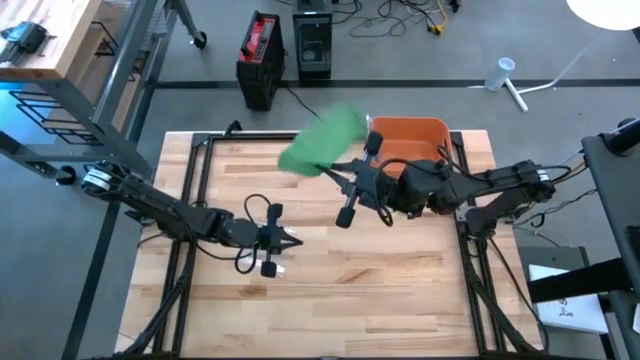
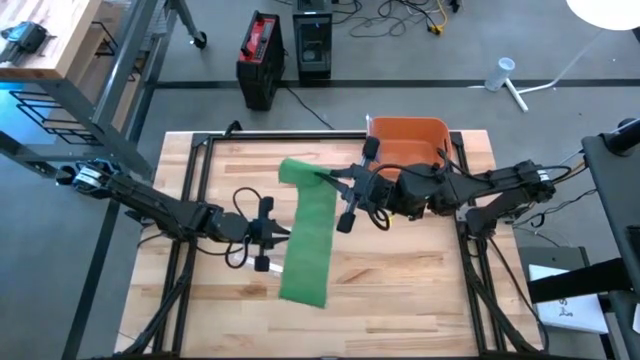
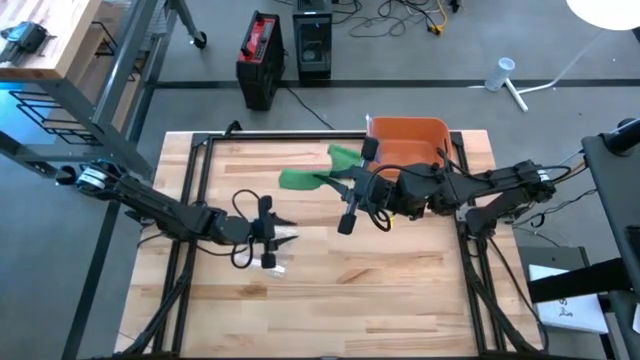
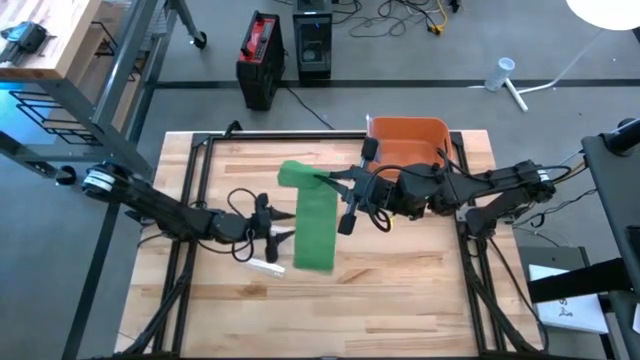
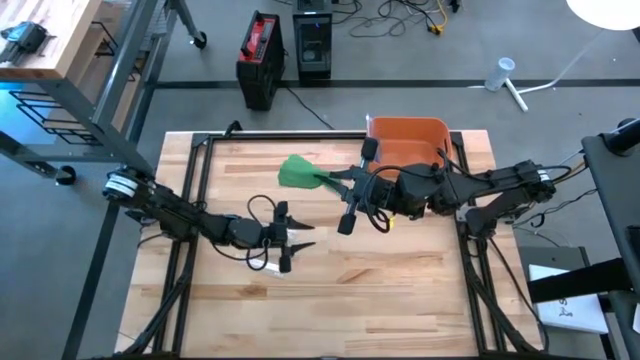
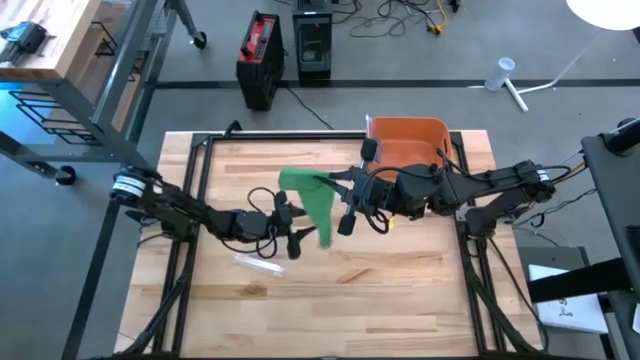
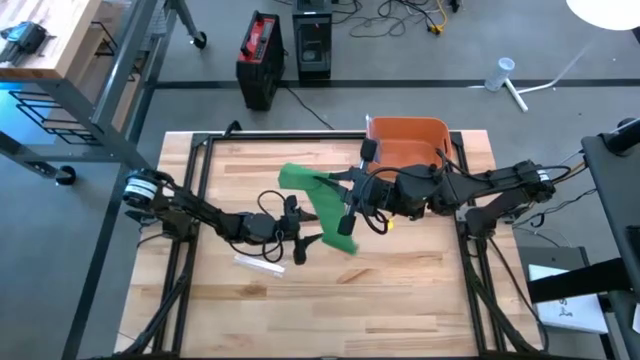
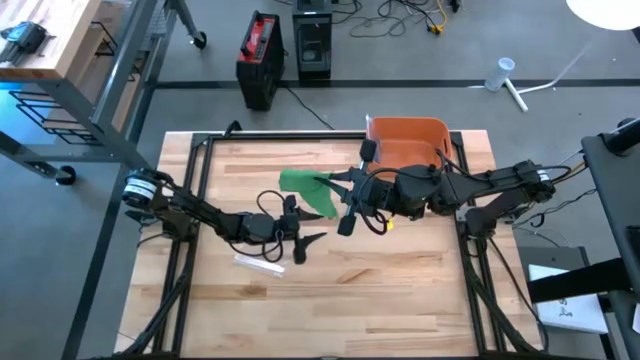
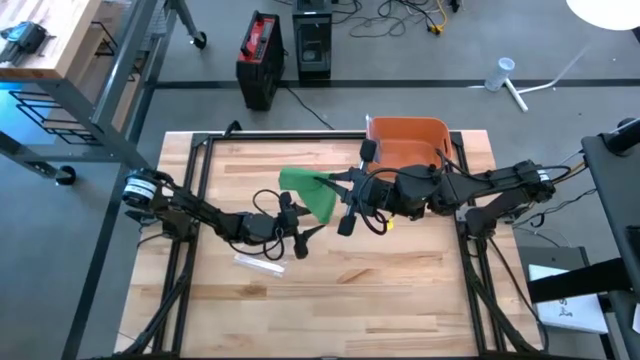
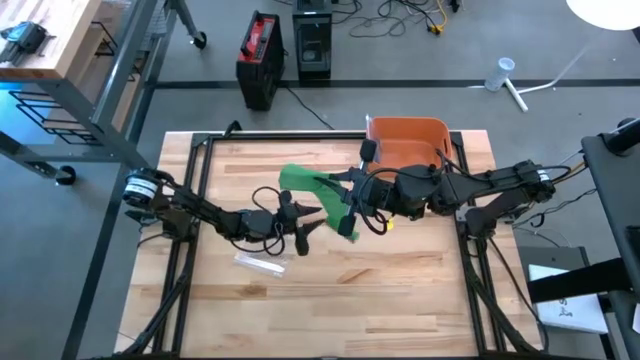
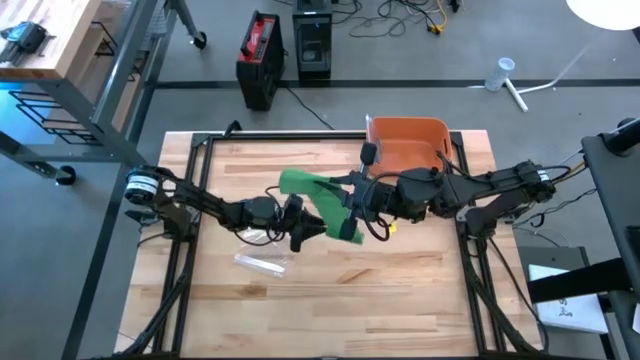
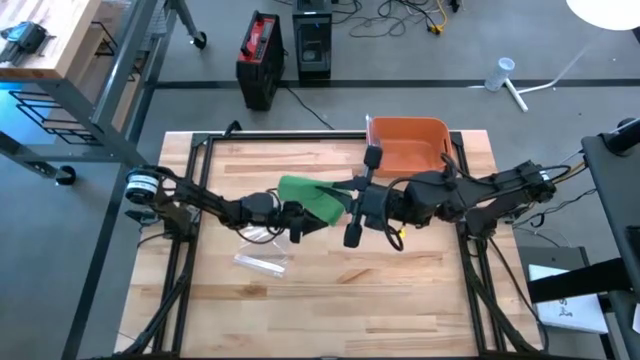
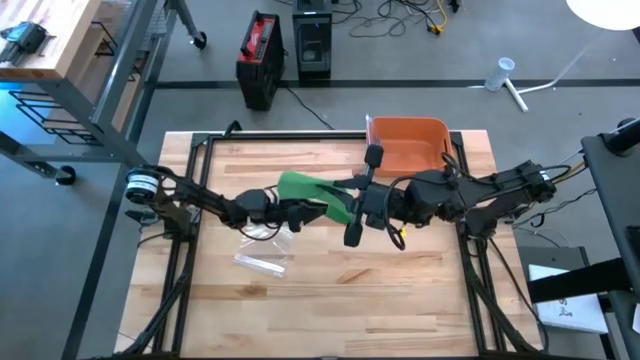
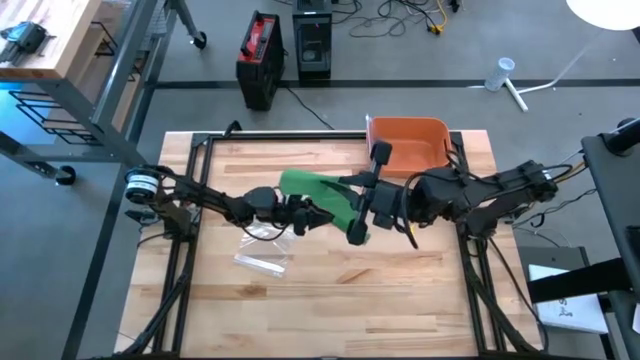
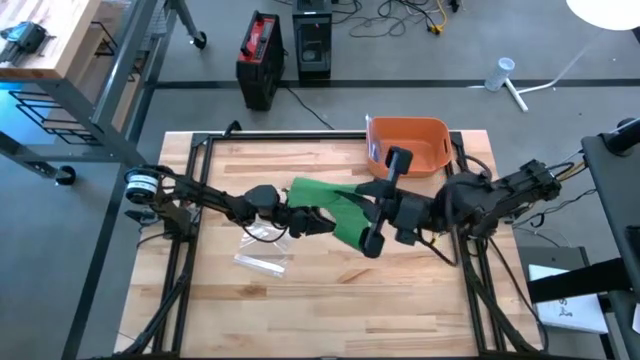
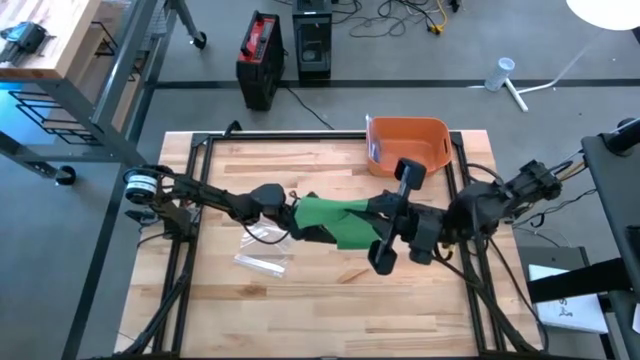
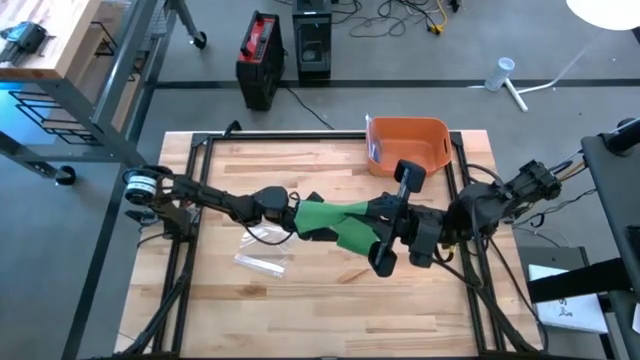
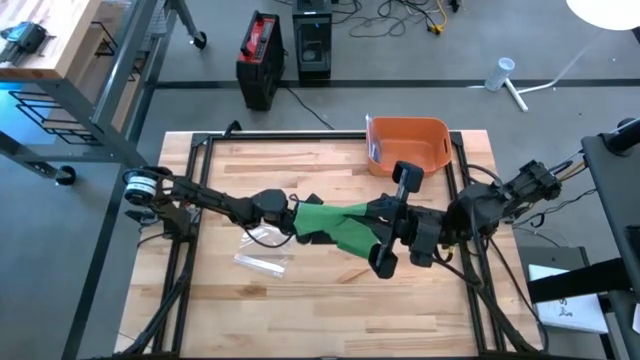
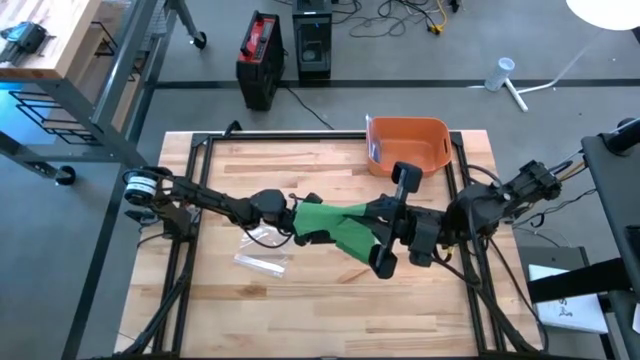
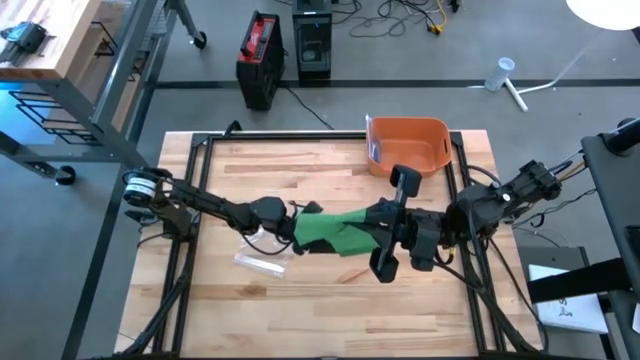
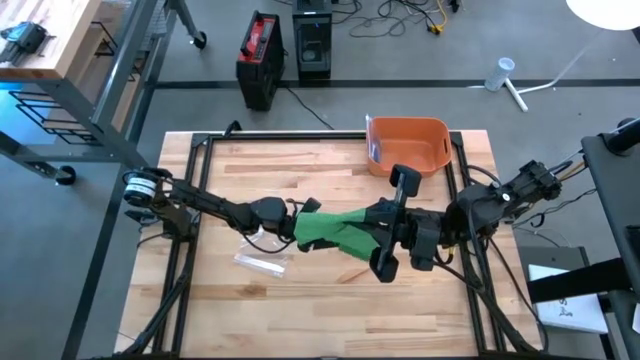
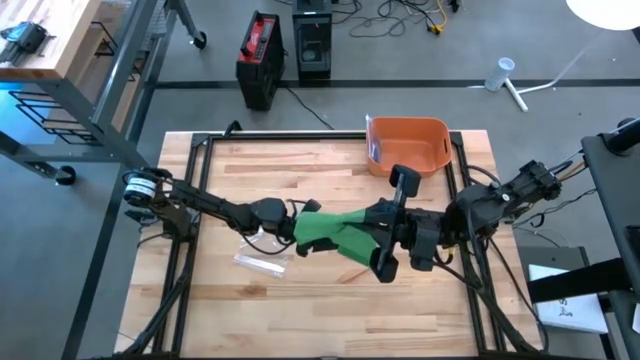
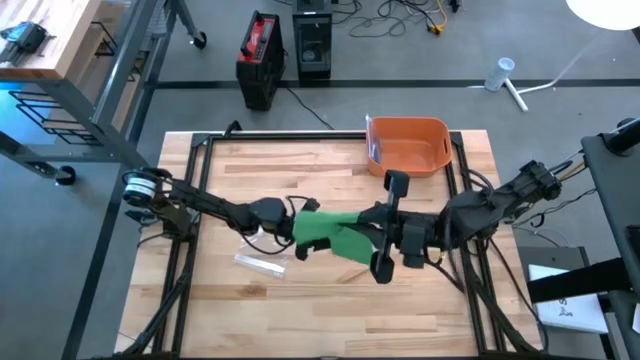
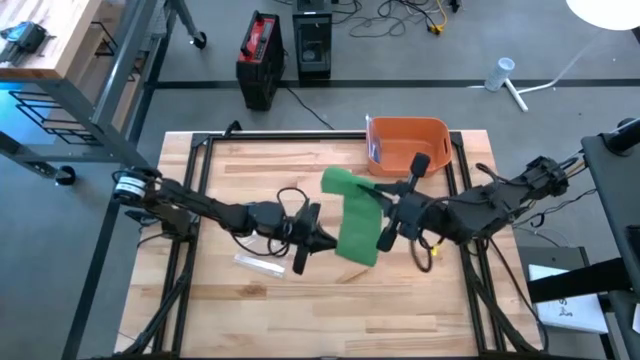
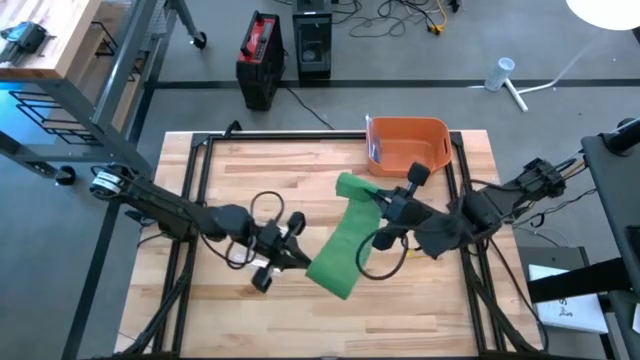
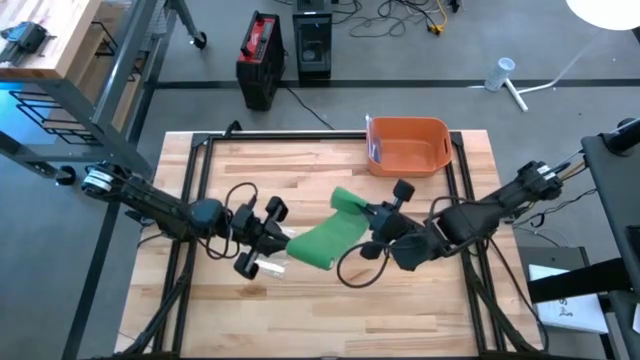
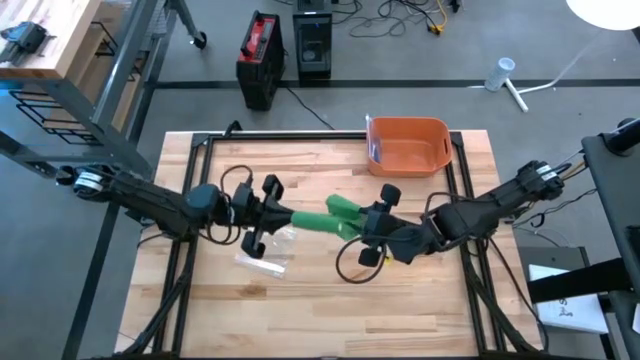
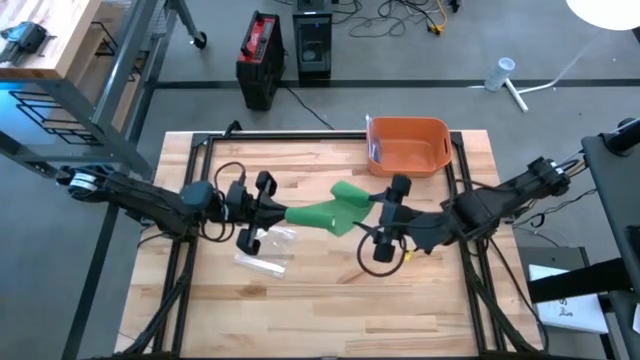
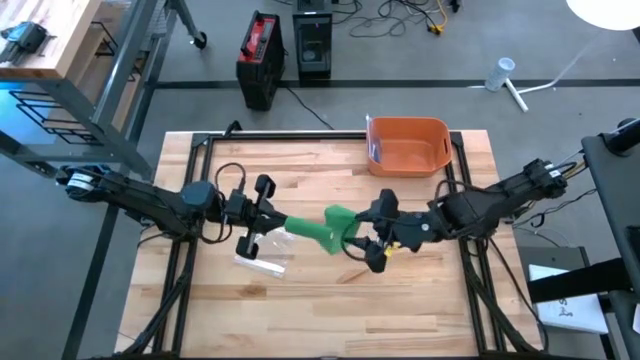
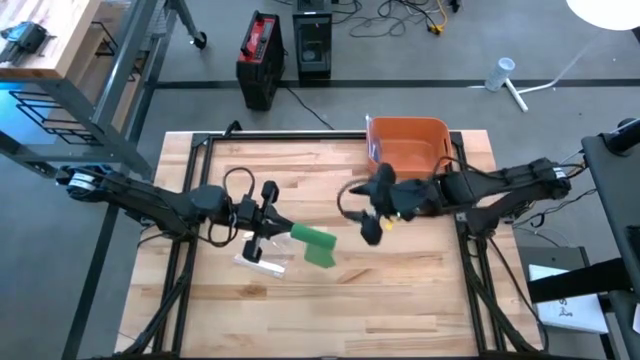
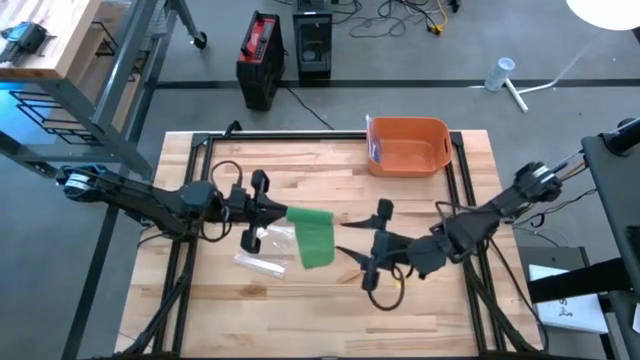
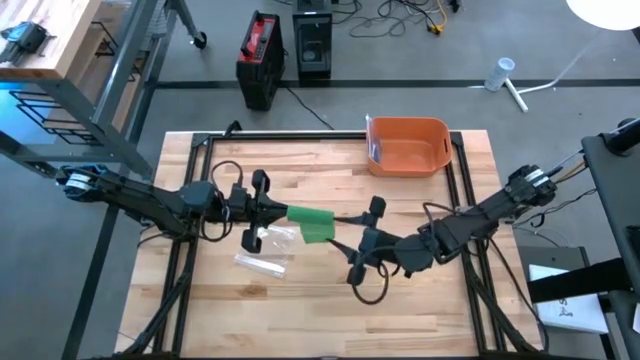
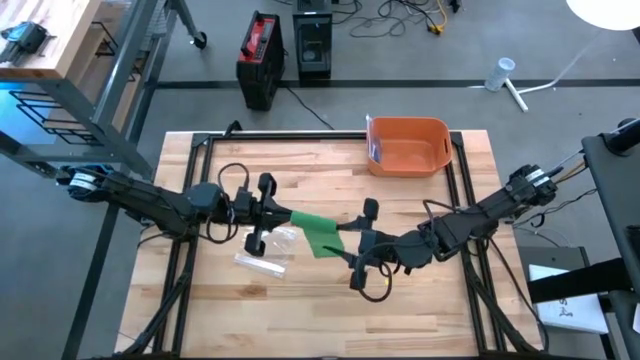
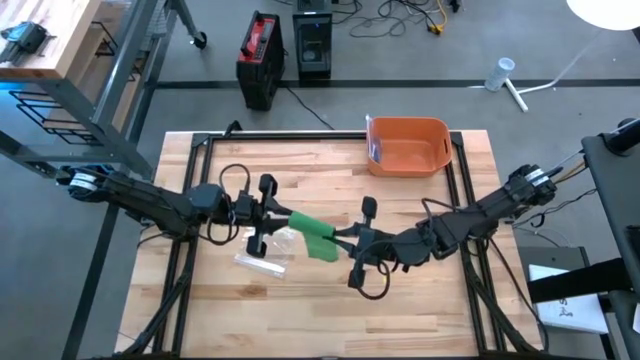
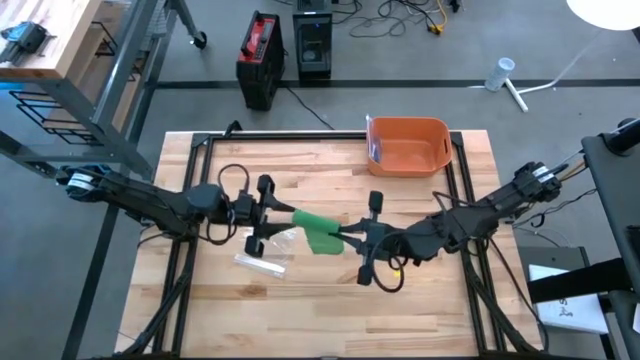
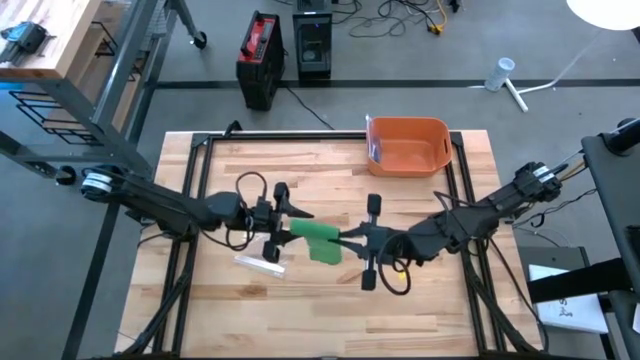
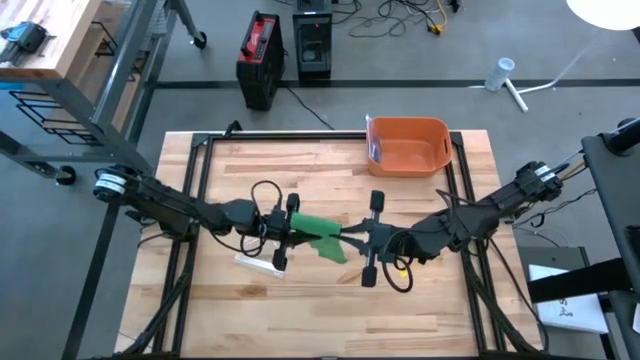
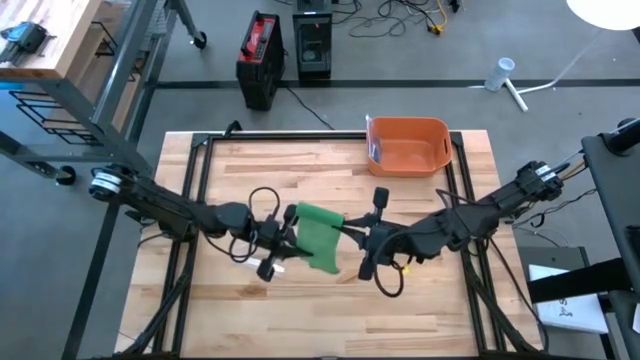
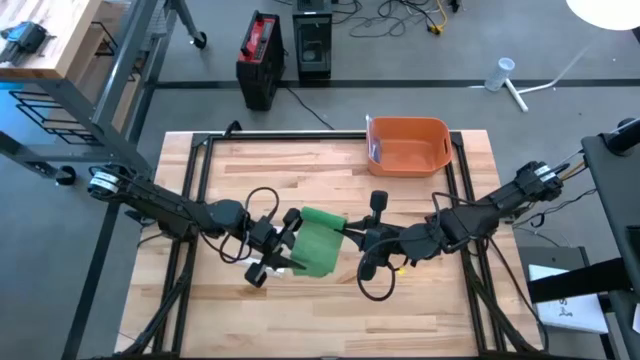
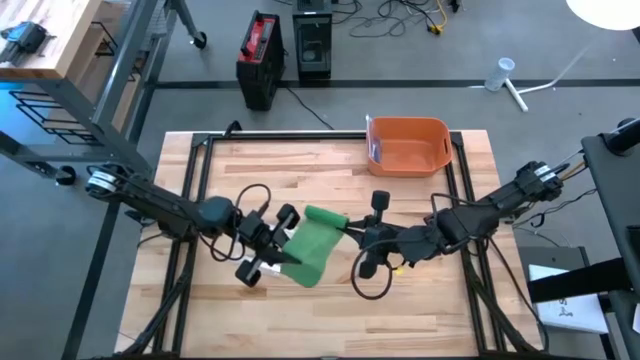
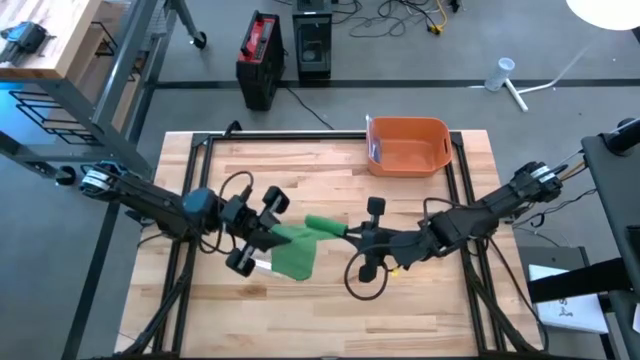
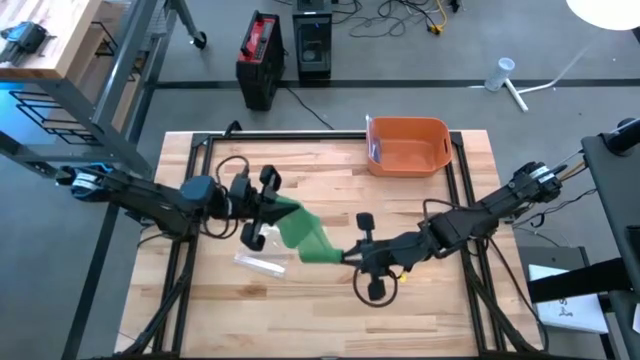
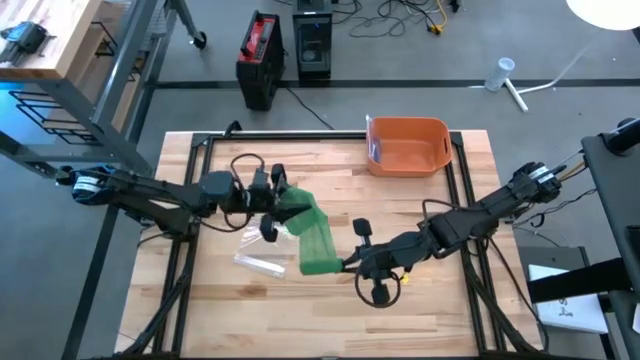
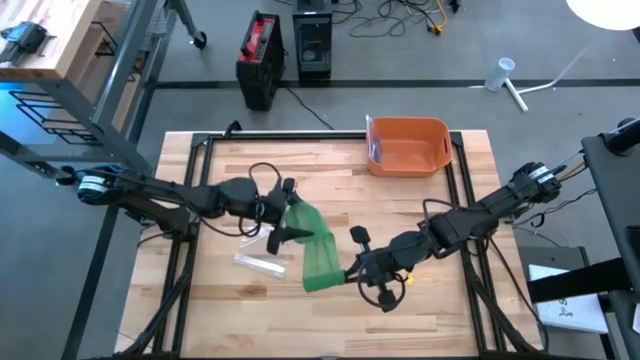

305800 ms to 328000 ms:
Task: Roll bandage
Roll the green bandage
